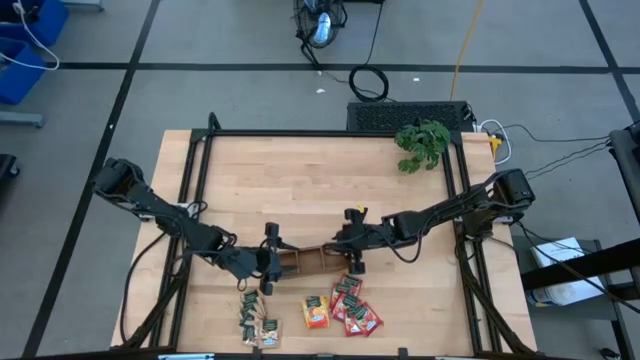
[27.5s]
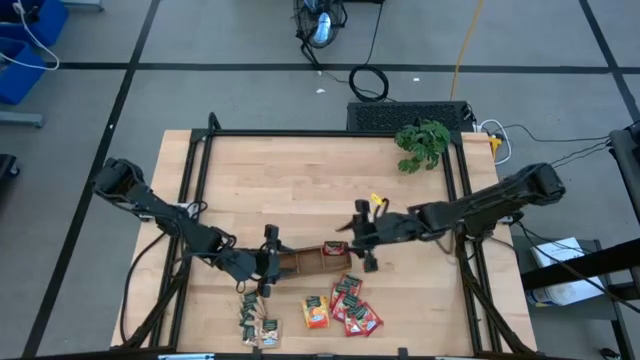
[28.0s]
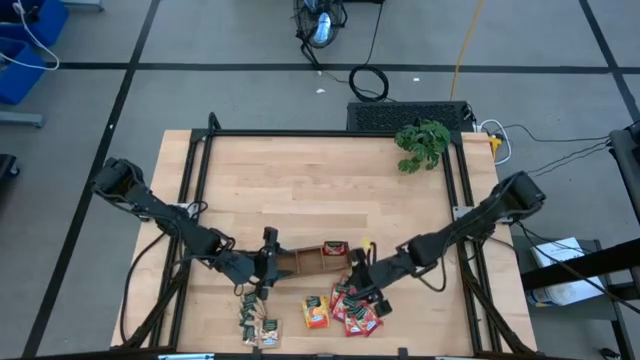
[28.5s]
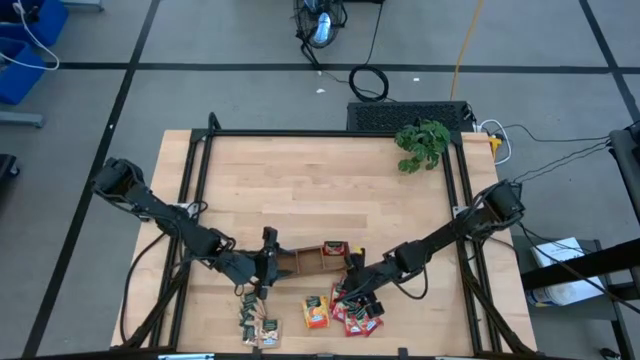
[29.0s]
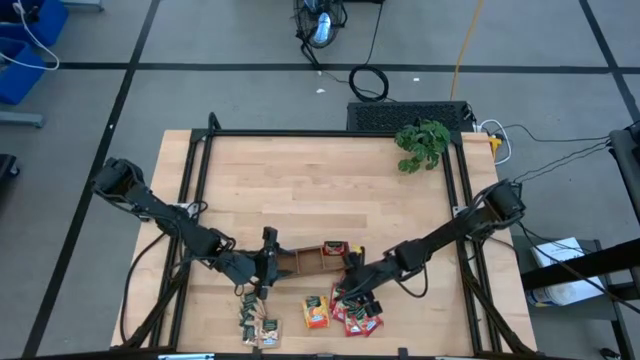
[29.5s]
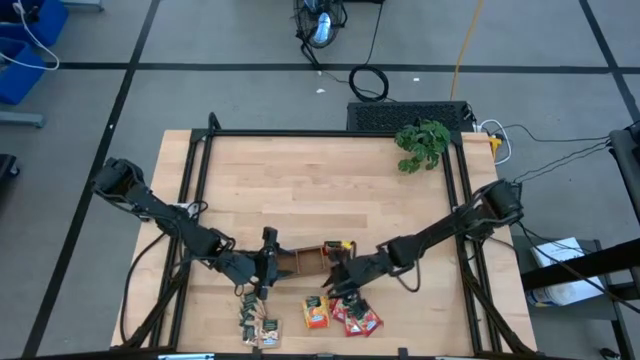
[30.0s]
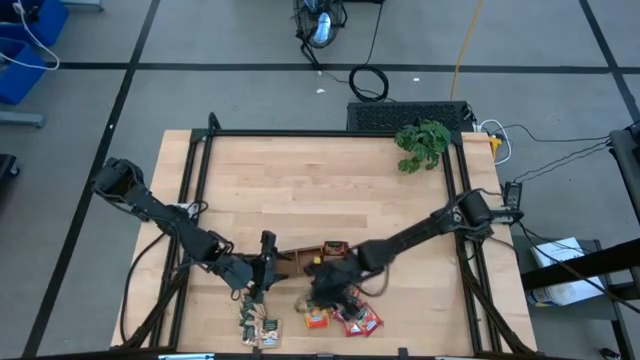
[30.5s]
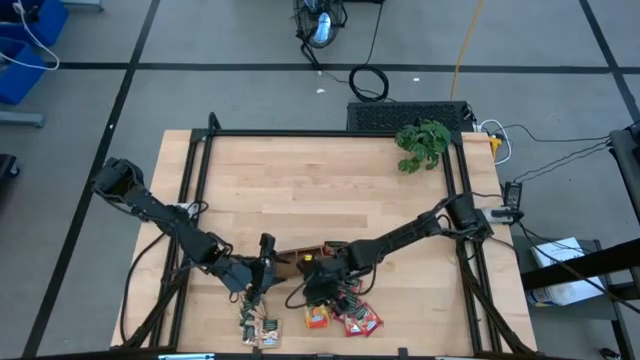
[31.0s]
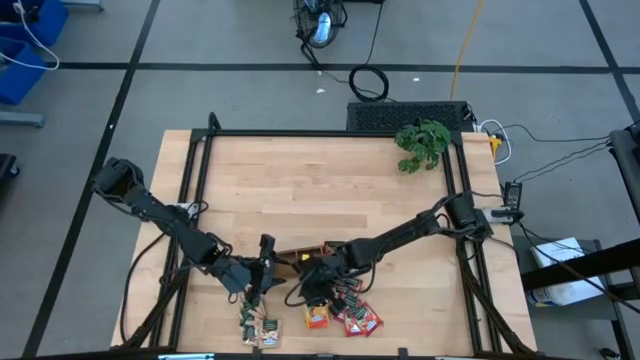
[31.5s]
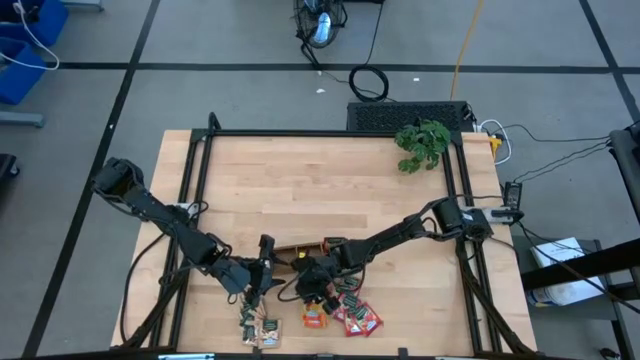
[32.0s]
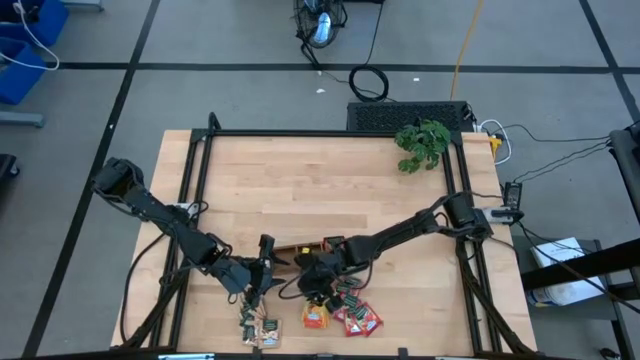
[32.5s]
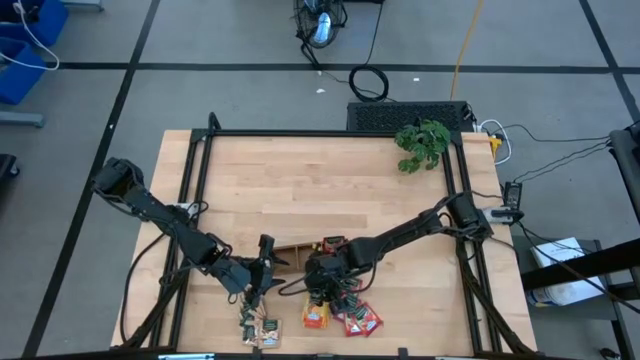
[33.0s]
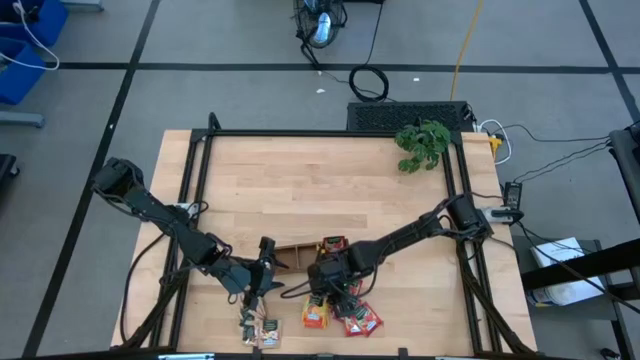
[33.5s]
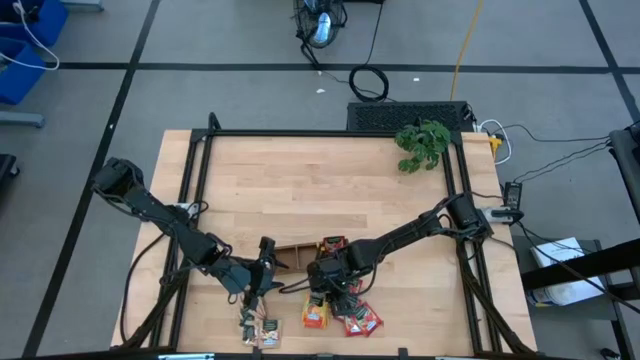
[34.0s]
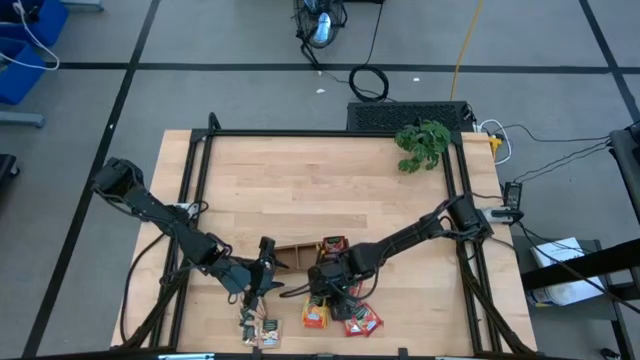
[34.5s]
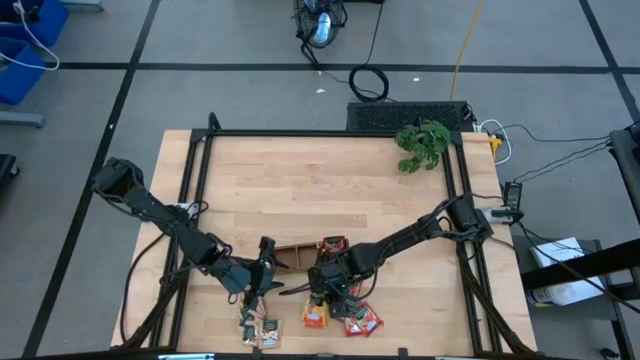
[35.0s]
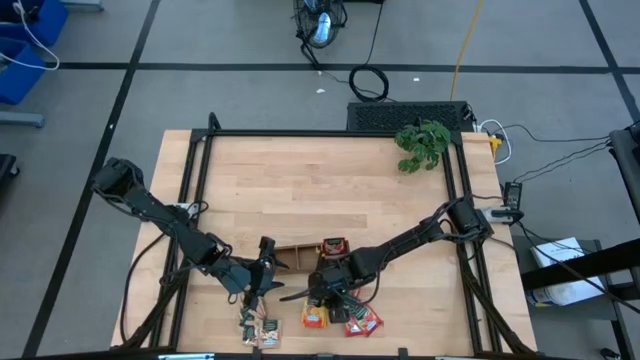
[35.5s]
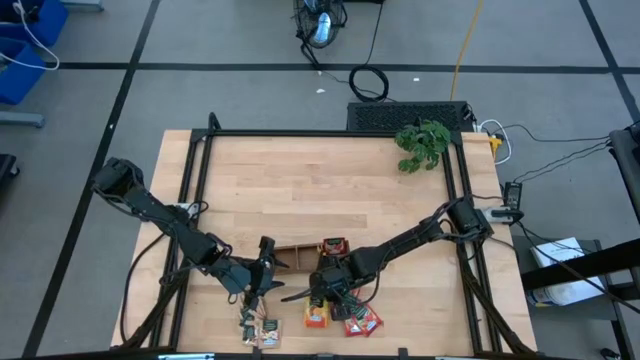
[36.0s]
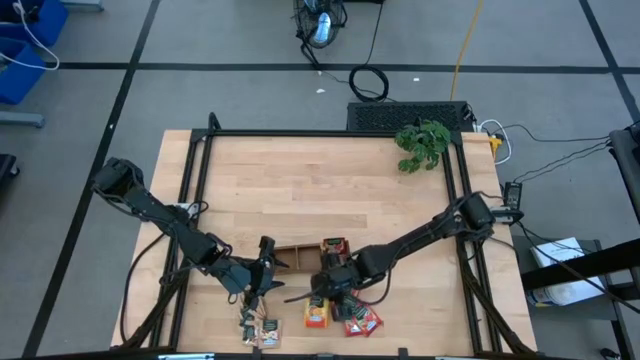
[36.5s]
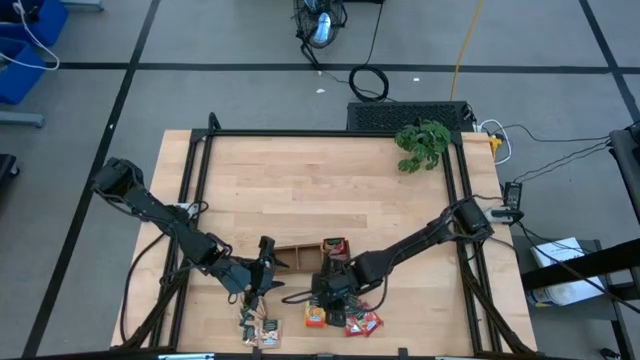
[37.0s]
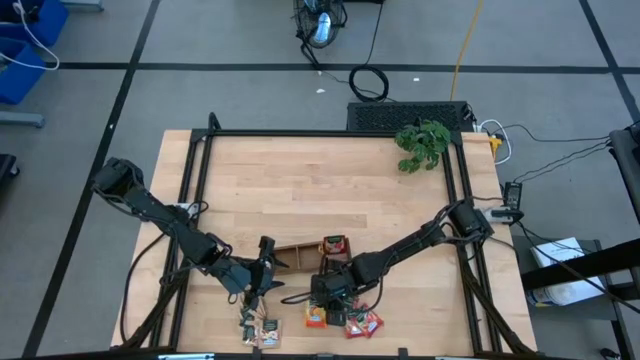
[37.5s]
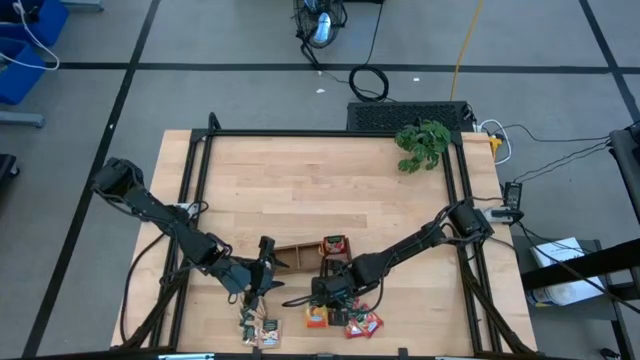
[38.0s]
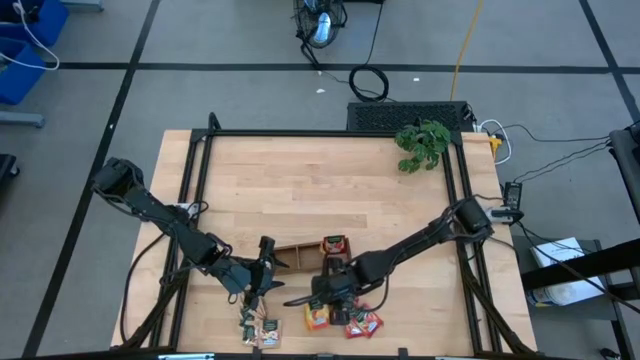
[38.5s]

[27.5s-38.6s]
Task: Pick & Place Tea
Put the yellow tea bag into the middle section of the wooden organizer

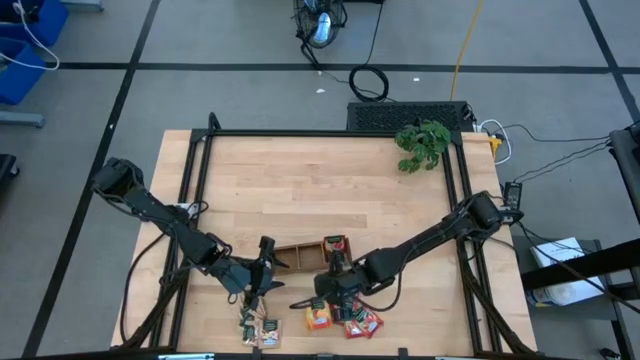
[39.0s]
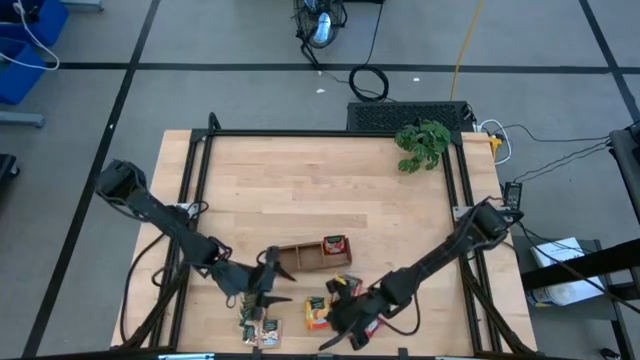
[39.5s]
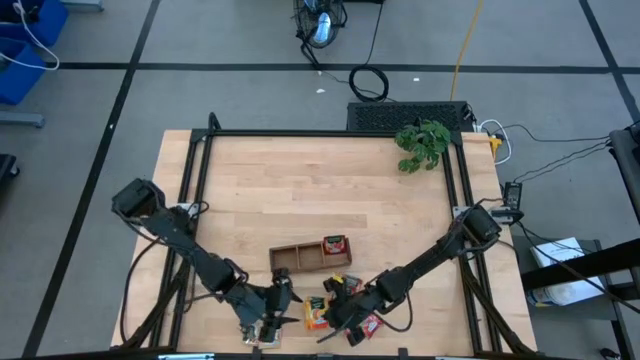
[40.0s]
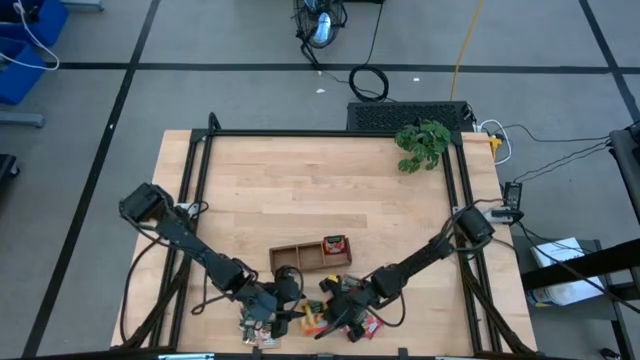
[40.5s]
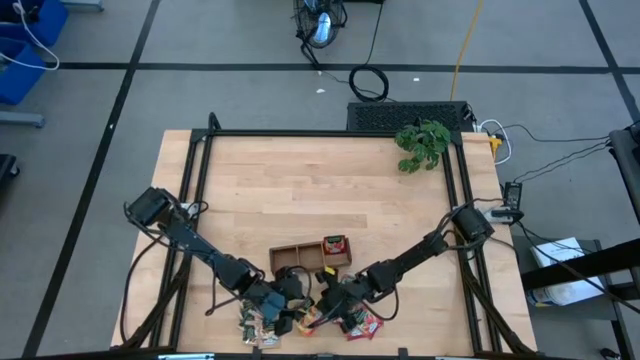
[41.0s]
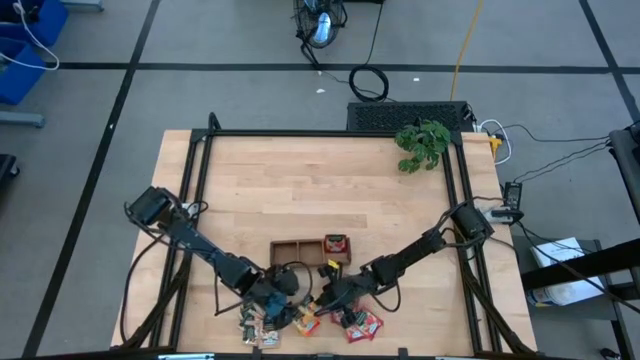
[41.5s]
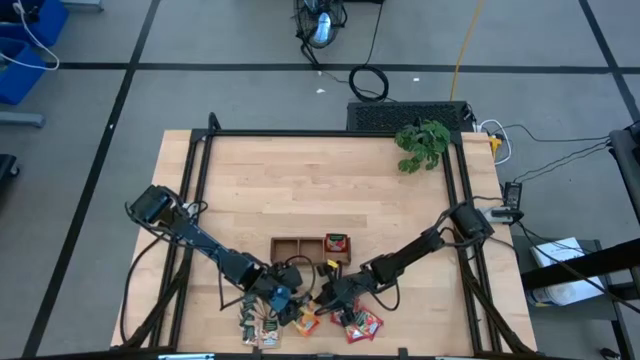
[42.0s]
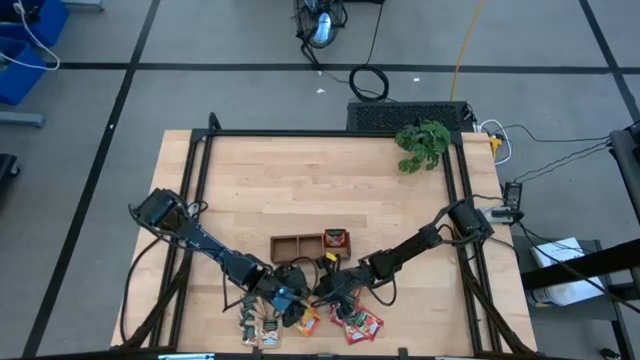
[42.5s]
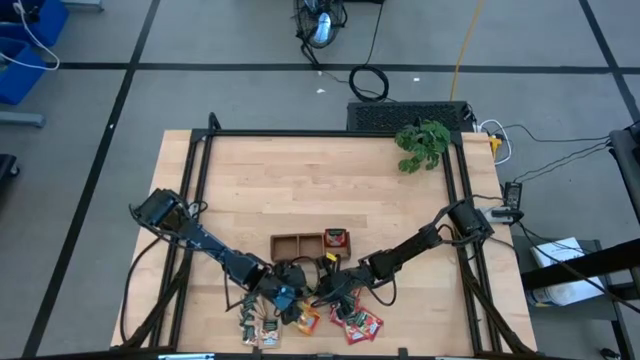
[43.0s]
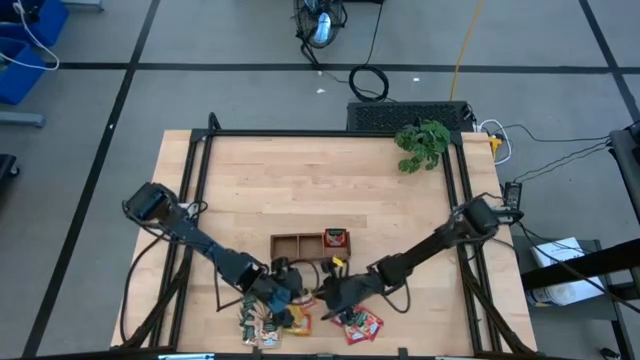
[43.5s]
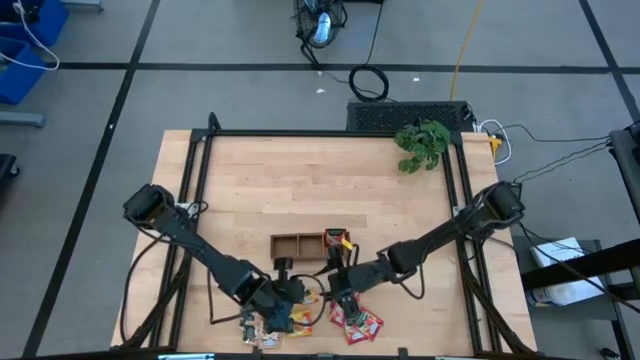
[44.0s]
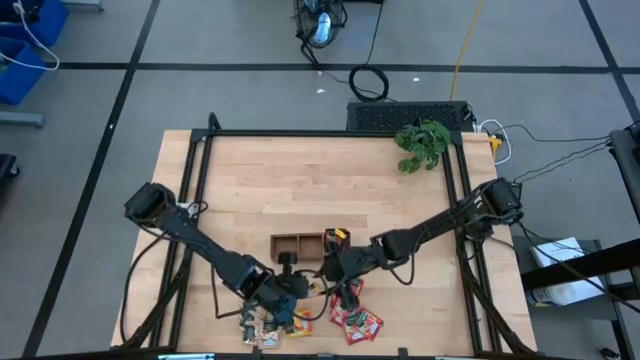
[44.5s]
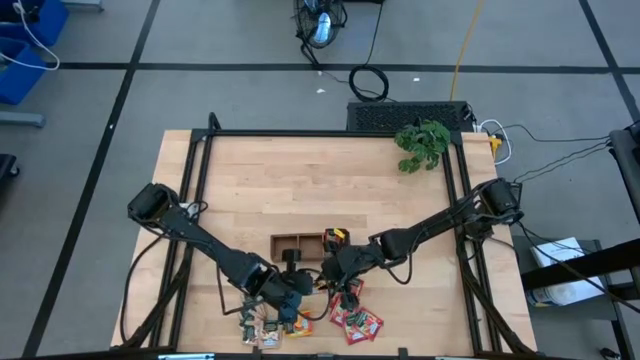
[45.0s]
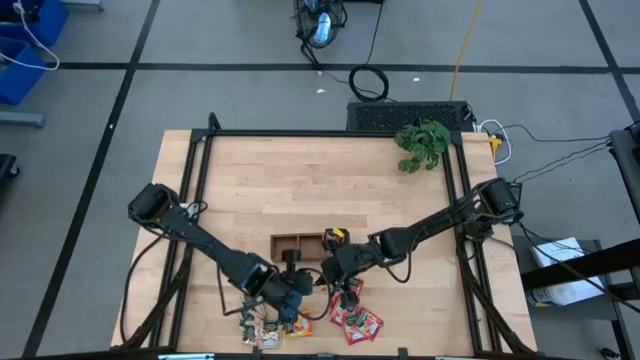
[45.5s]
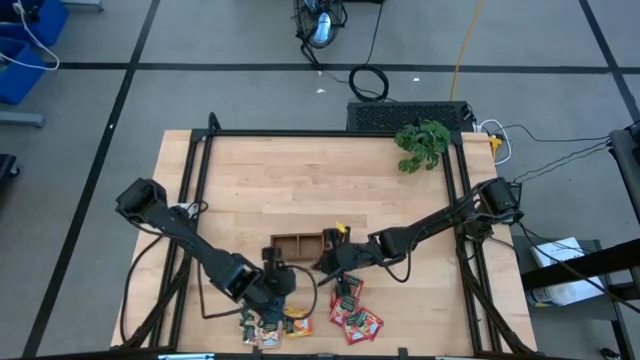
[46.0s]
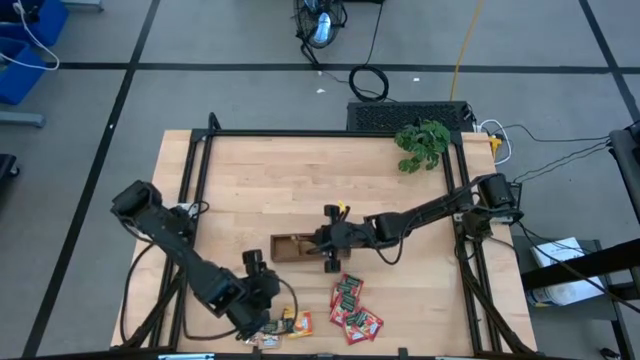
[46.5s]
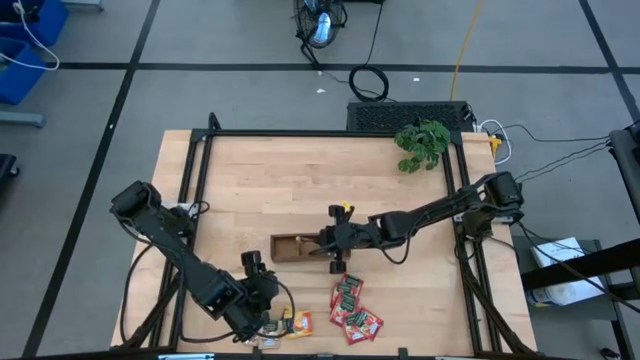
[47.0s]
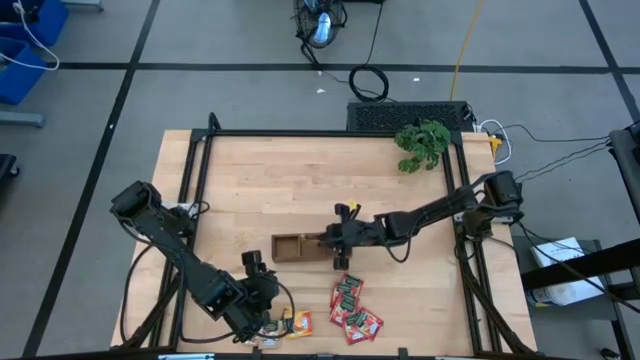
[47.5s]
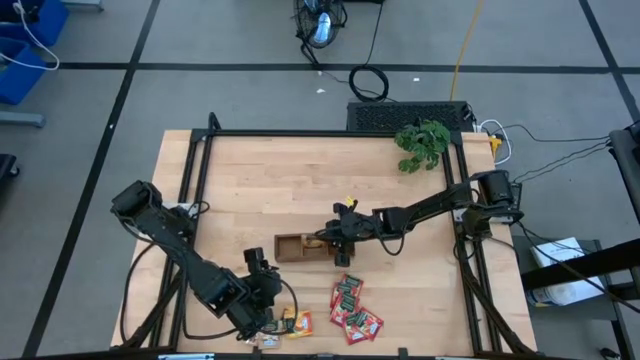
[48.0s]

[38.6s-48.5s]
Put the yellow tea bag into the middle section of the wooden organizer

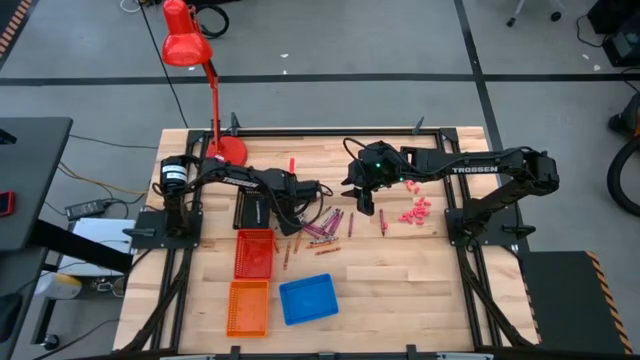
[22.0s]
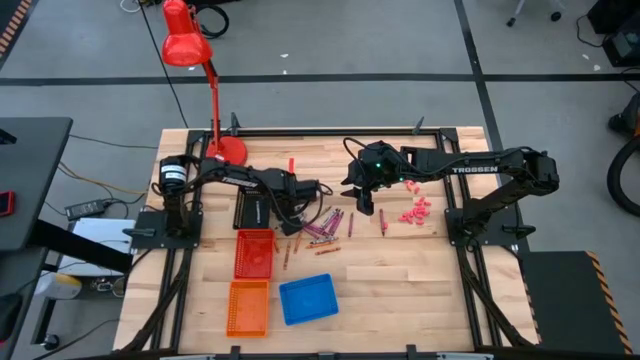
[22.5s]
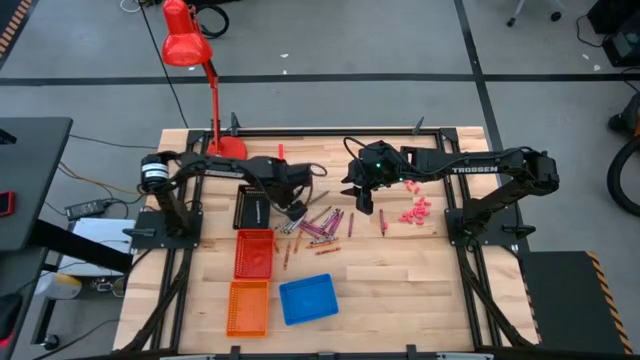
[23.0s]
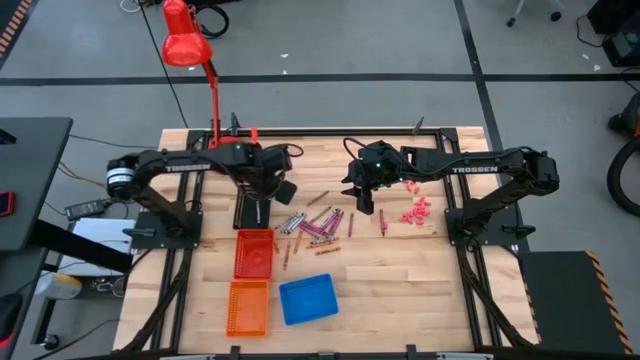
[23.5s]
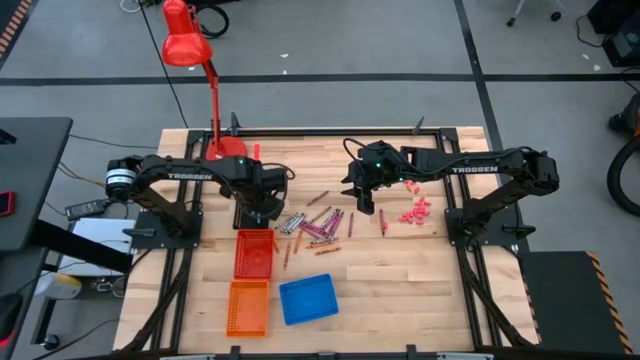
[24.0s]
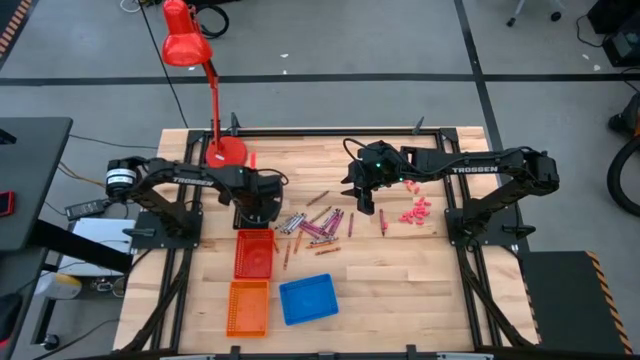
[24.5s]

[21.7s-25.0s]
Task: Sort crayons
Put the black crayon into the black bin
